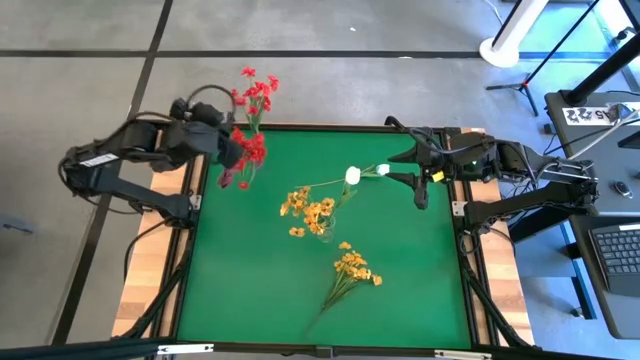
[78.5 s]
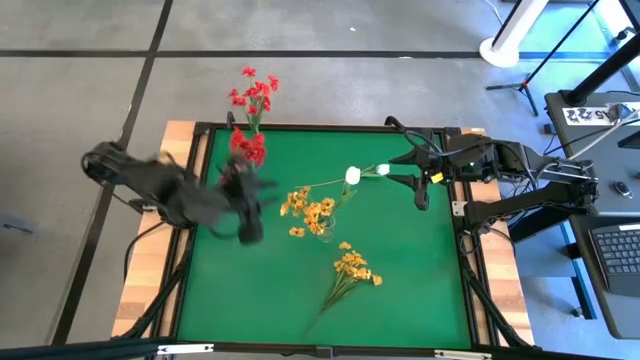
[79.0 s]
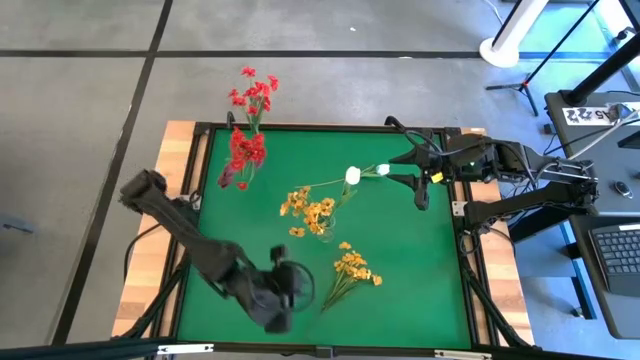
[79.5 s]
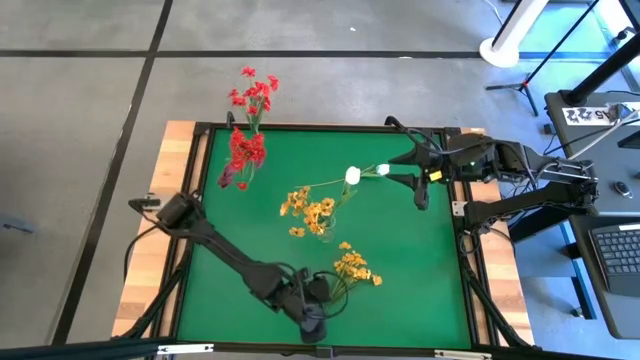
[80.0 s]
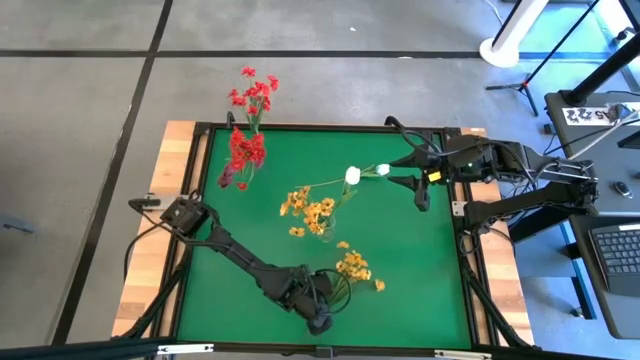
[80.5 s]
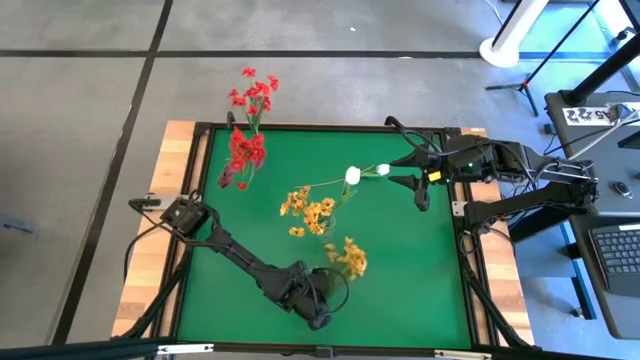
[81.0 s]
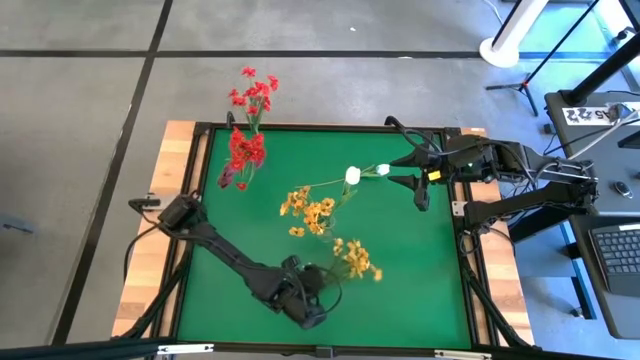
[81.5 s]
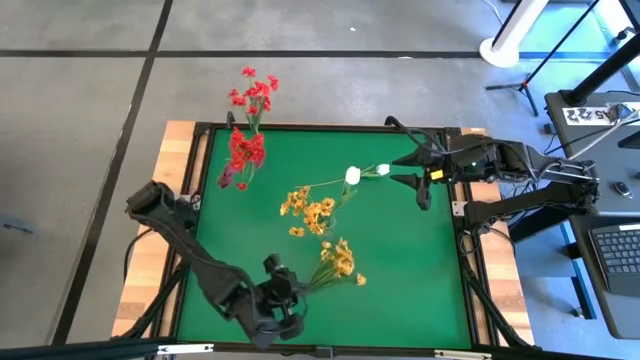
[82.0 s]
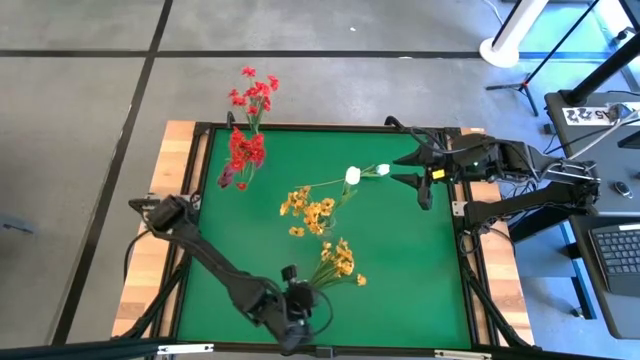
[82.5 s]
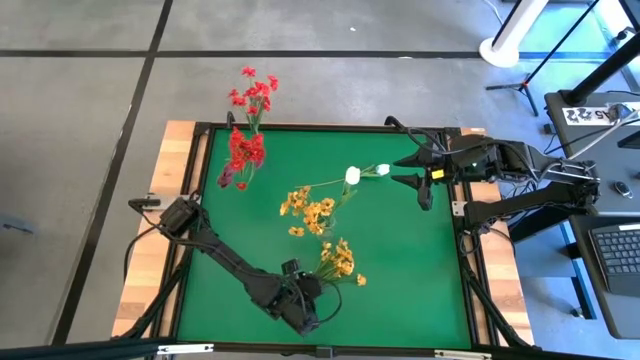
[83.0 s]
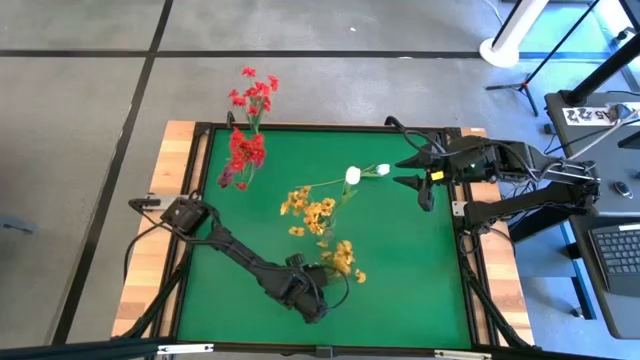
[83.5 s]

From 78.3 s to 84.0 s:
Task: Sort flowers into vase by color
Put the yellow flowers into the transparent vase

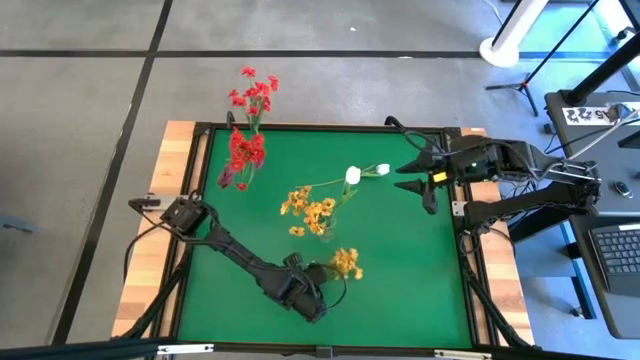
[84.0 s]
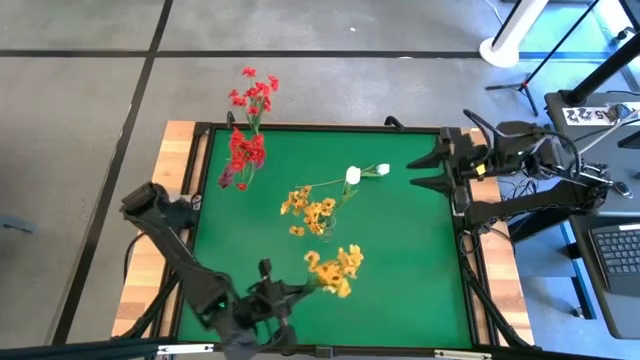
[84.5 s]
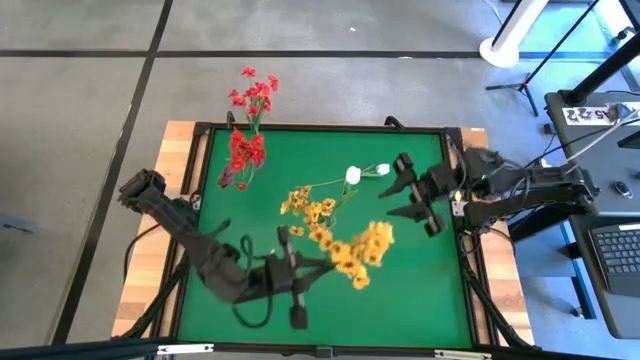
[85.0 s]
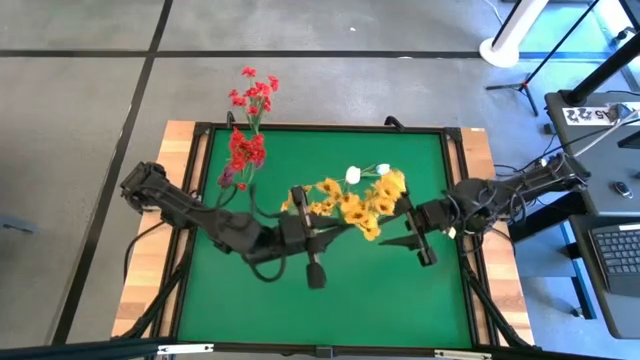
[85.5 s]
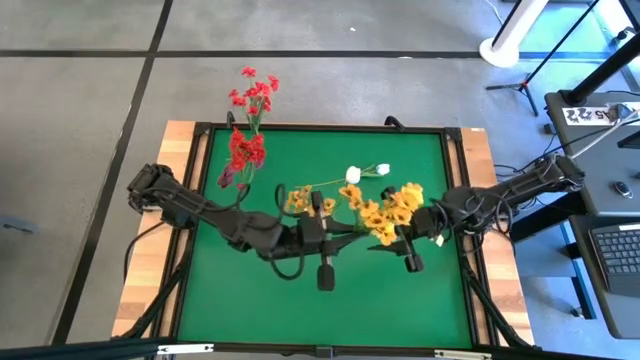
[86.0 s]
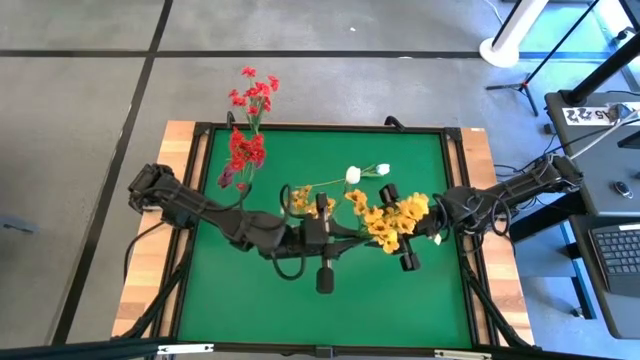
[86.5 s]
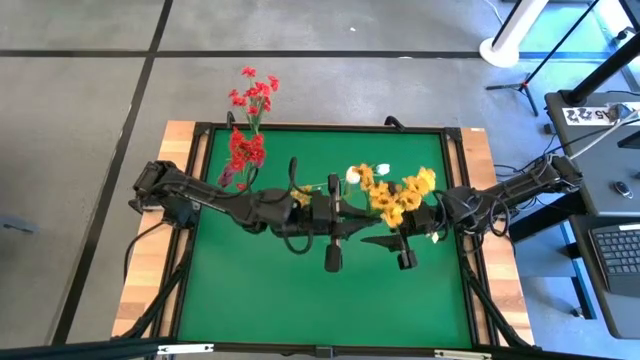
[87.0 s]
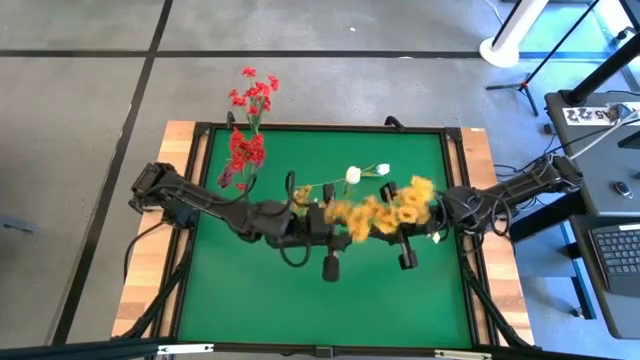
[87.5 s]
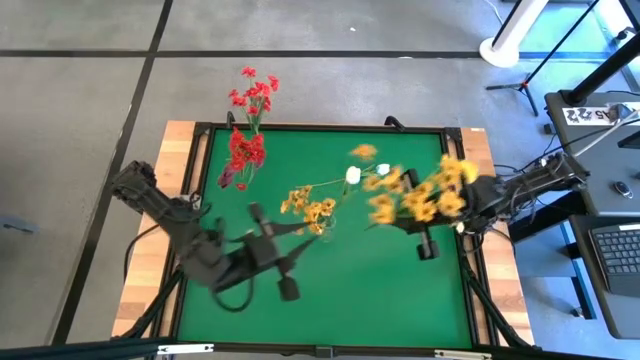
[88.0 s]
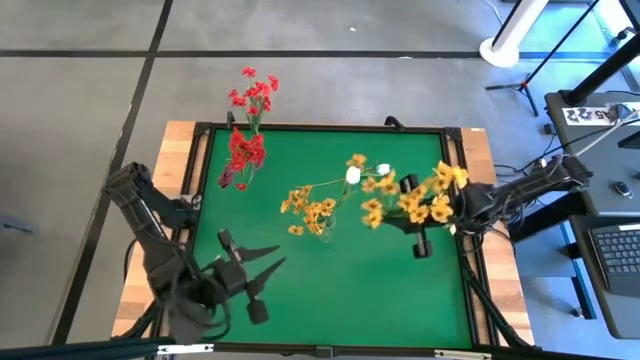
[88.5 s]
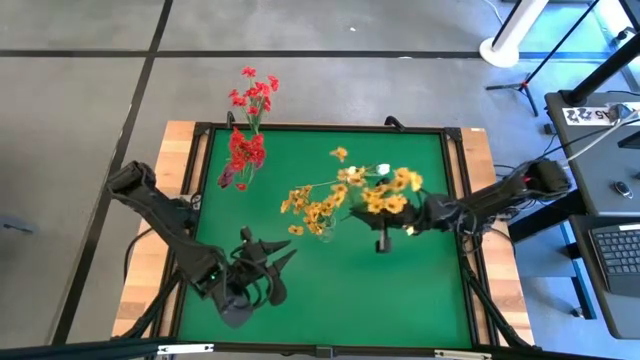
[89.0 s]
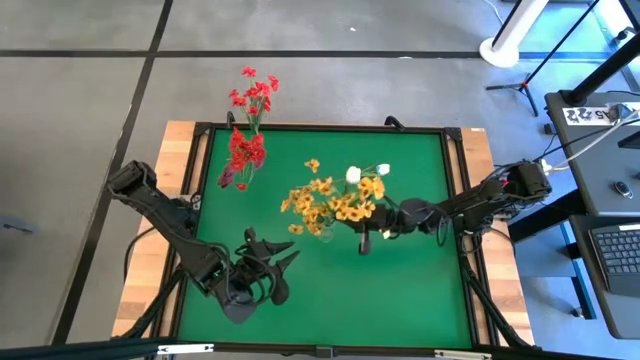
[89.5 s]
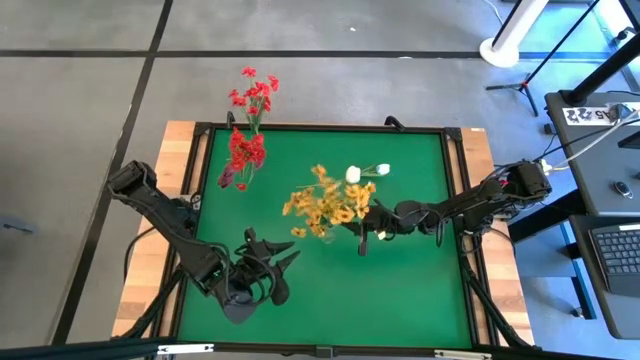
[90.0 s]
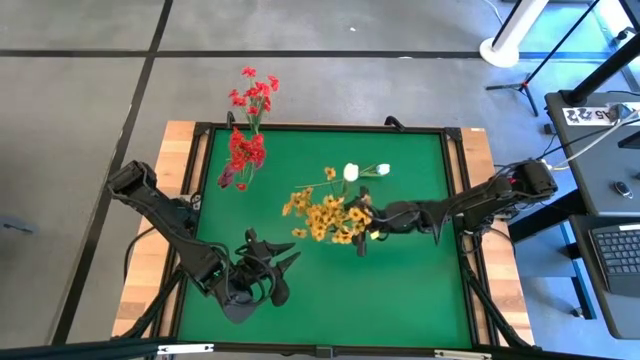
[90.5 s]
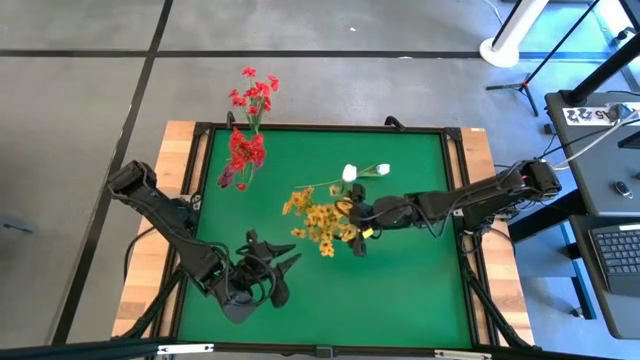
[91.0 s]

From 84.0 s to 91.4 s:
Put the yellow flower into the transparent vase

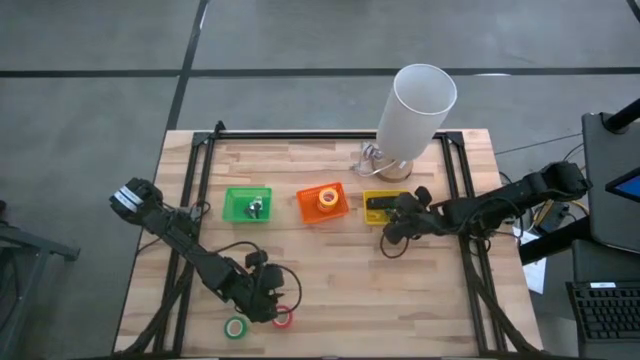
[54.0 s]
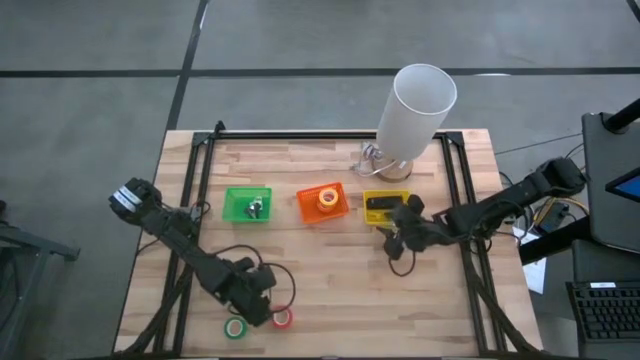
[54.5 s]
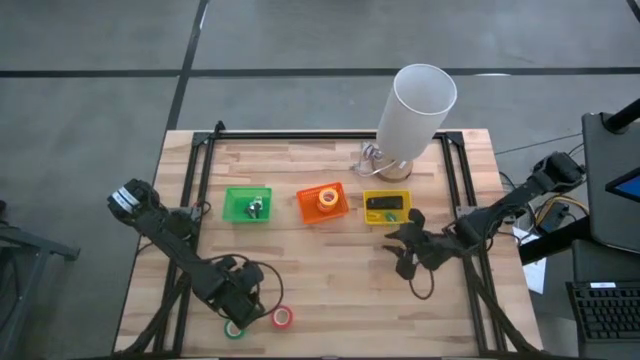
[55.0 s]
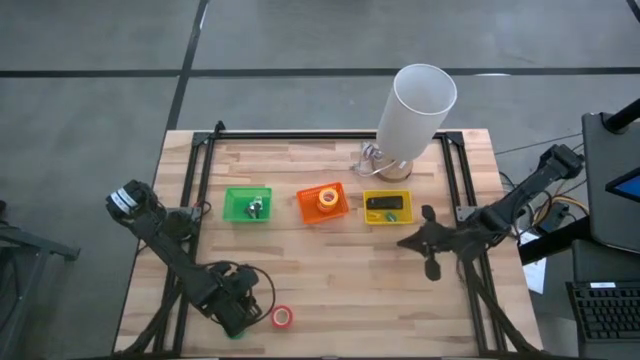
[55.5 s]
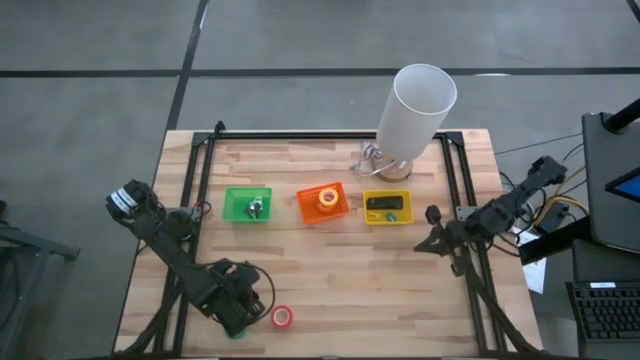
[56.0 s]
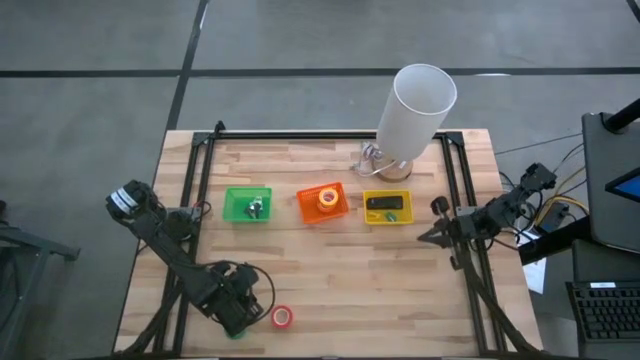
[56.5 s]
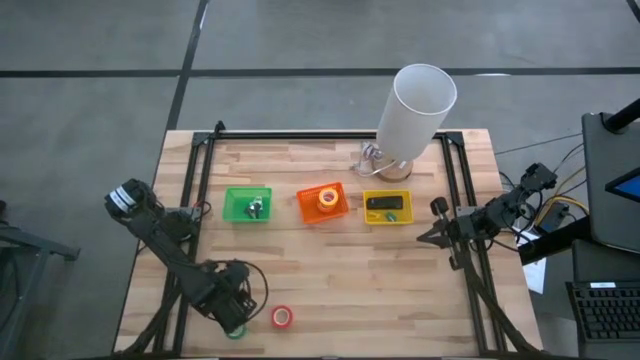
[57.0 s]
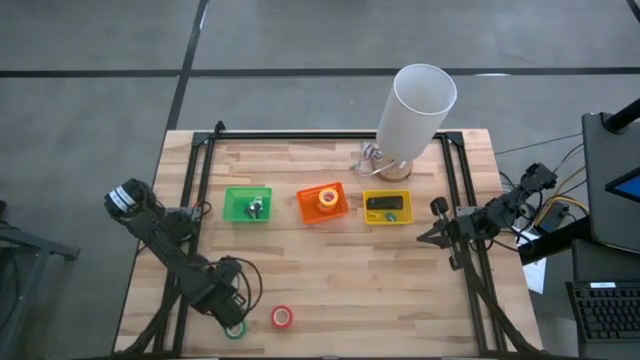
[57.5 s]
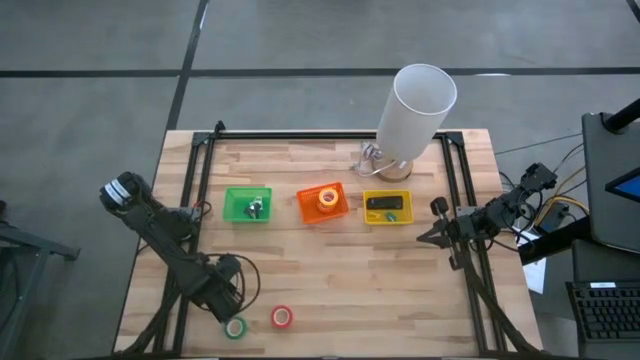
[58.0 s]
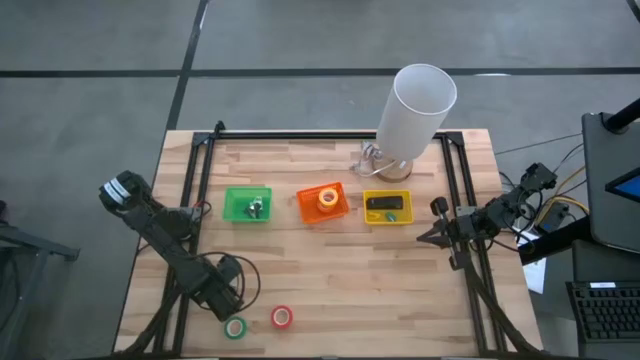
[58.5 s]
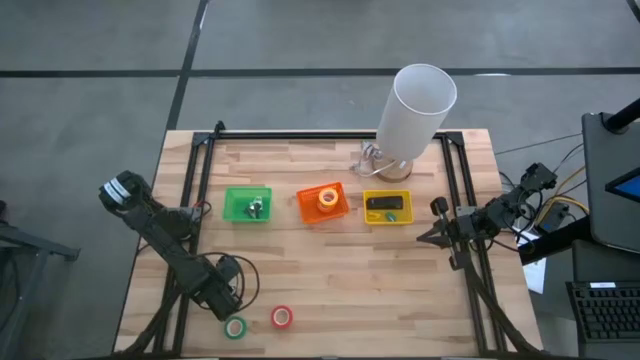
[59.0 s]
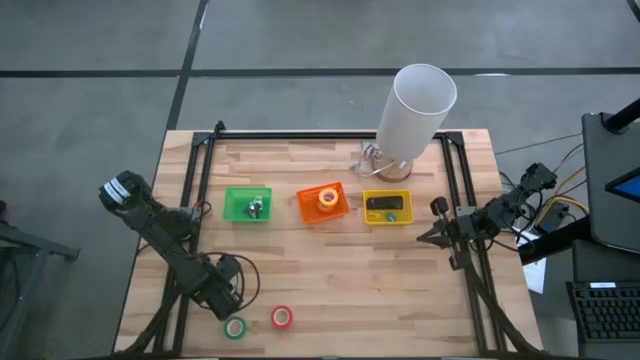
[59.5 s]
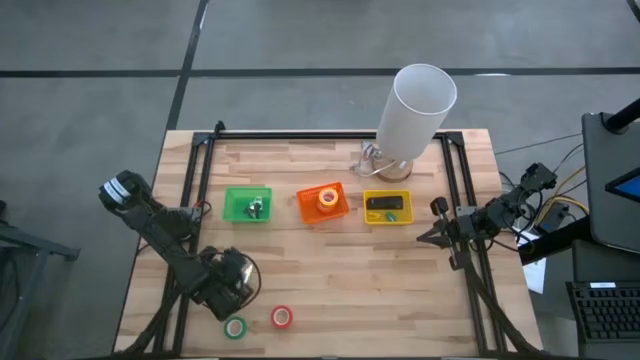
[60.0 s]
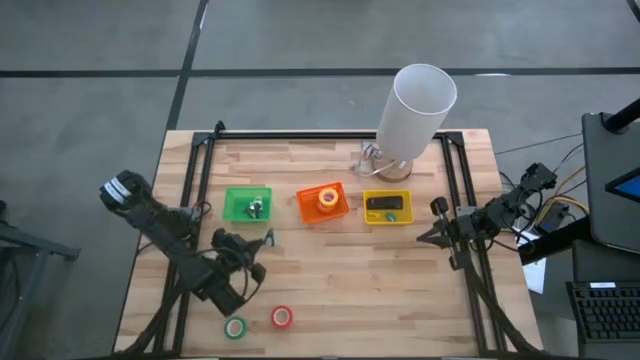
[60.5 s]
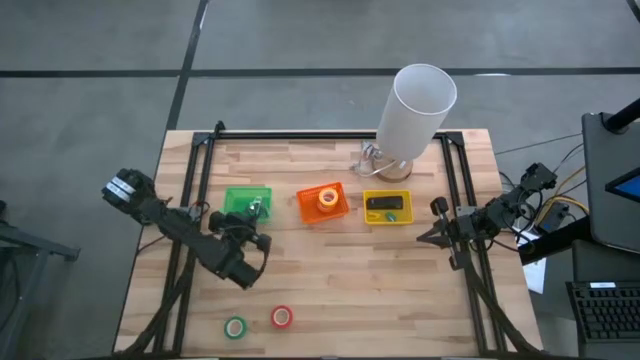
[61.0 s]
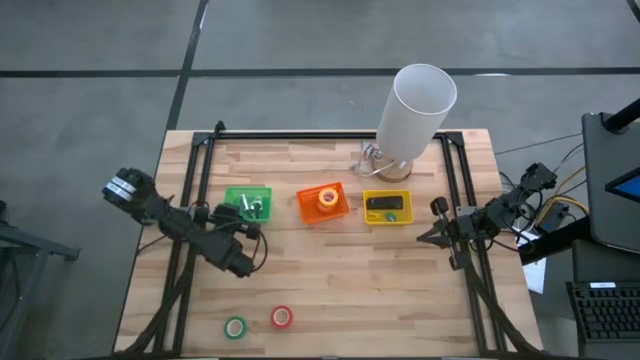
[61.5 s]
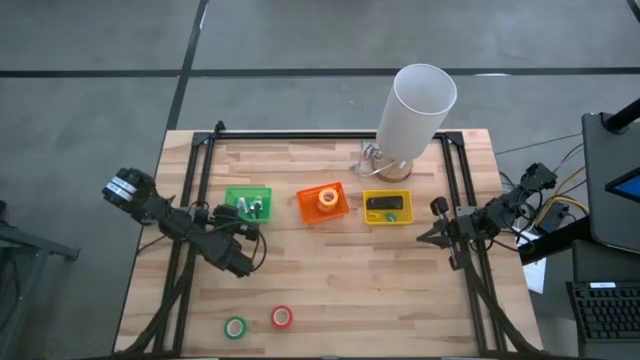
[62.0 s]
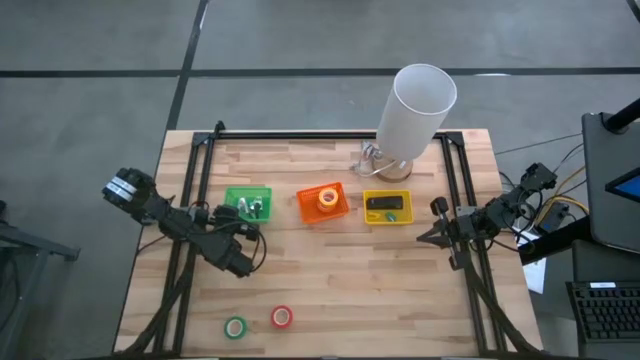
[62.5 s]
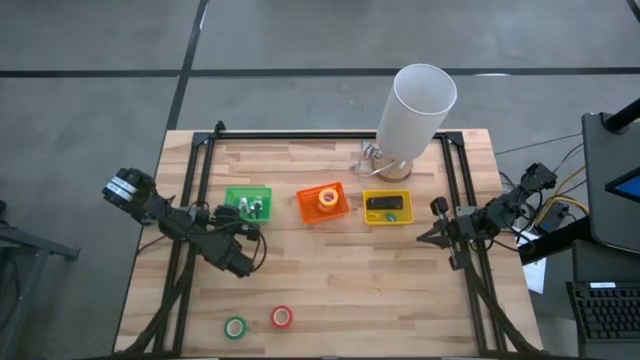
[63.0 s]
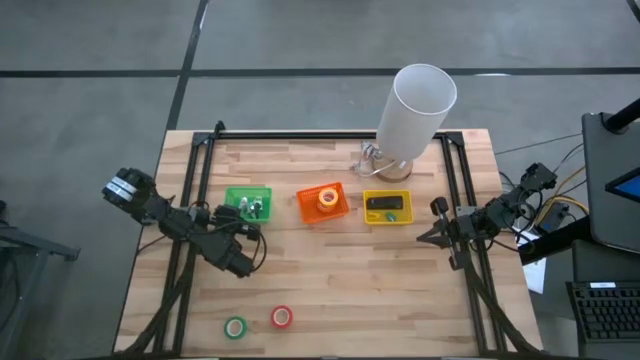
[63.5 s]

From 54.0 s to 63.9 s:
Task: Pick and place Stapler, Stapler remover, tape
Put the light blue staple remover into the green basket
